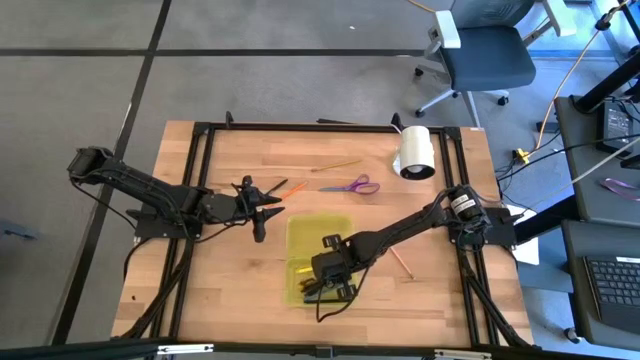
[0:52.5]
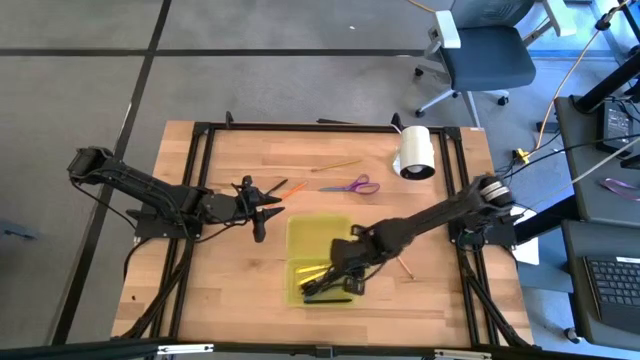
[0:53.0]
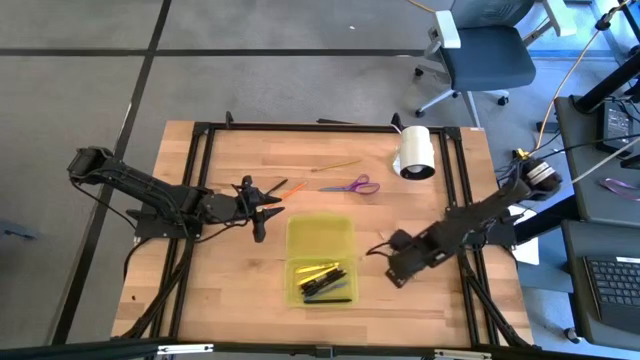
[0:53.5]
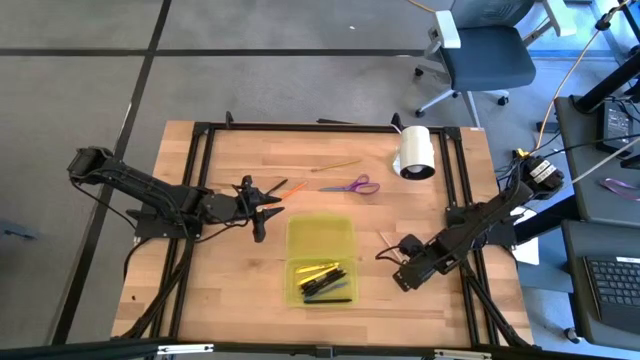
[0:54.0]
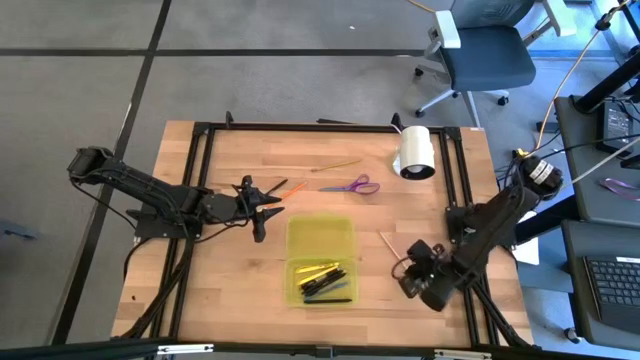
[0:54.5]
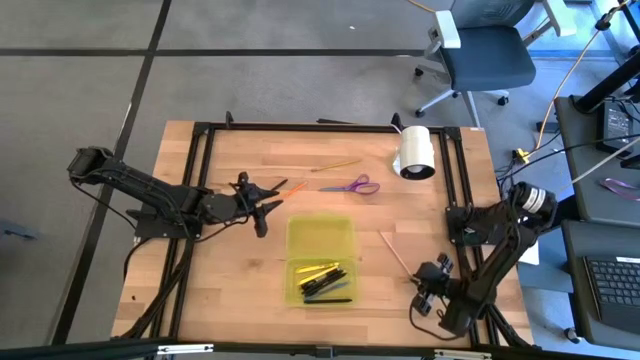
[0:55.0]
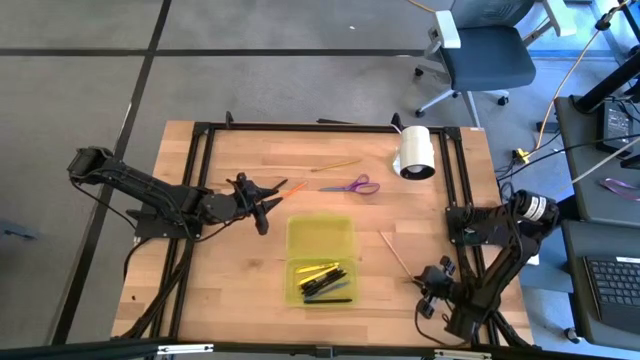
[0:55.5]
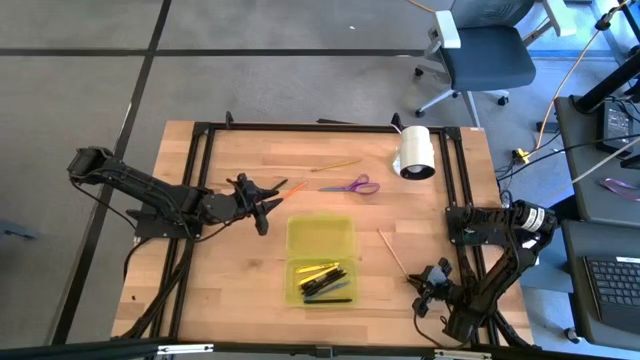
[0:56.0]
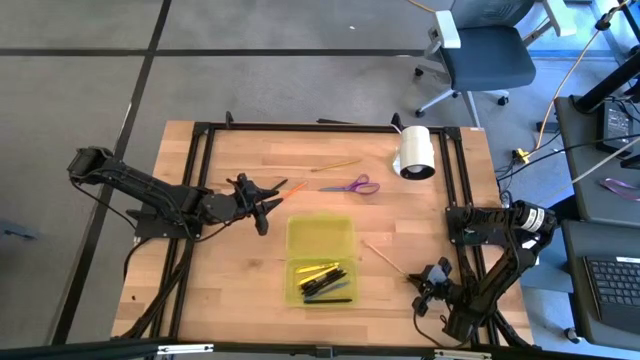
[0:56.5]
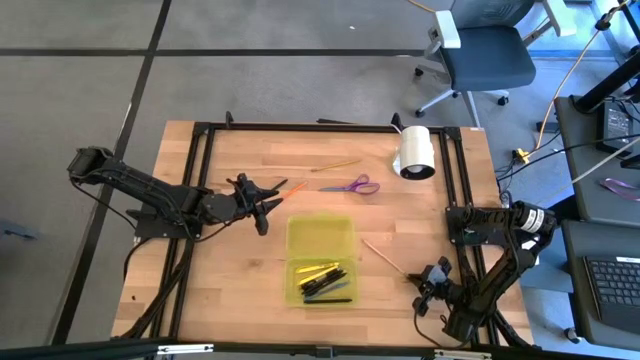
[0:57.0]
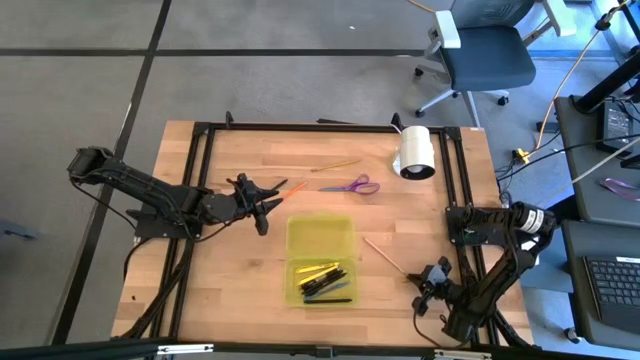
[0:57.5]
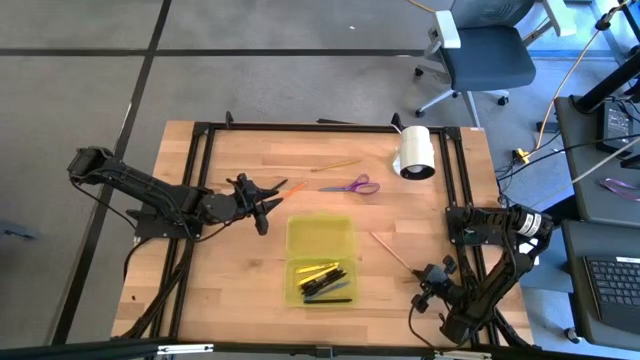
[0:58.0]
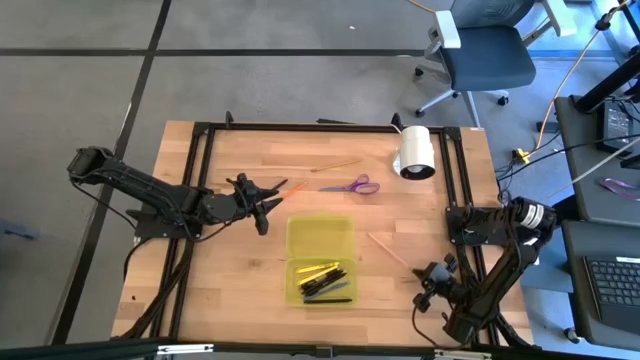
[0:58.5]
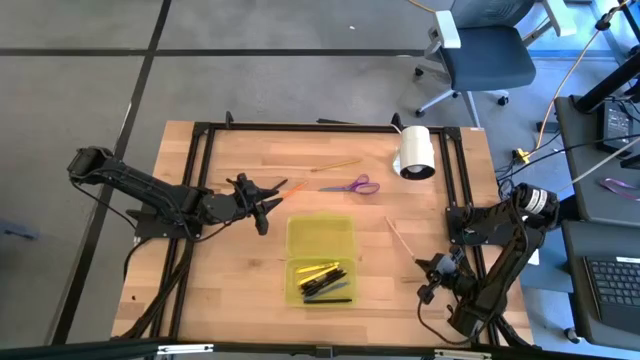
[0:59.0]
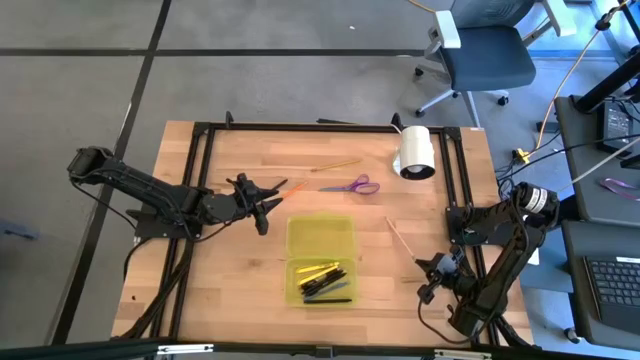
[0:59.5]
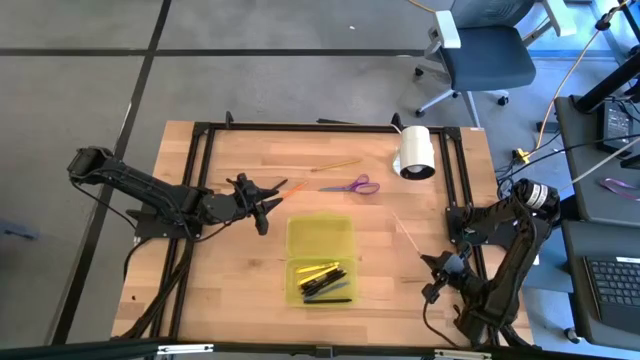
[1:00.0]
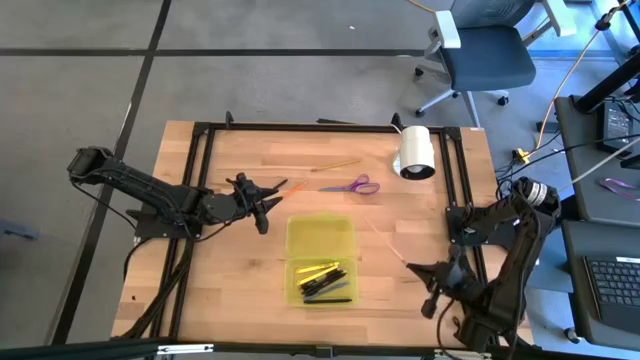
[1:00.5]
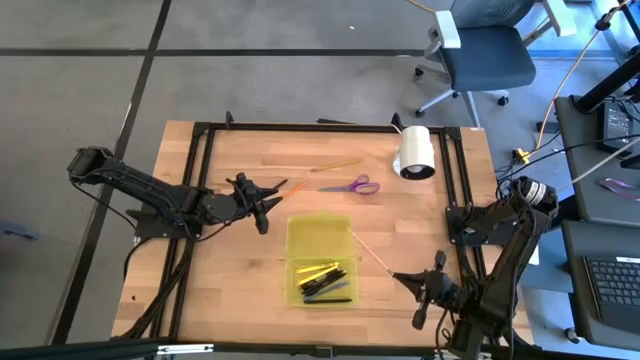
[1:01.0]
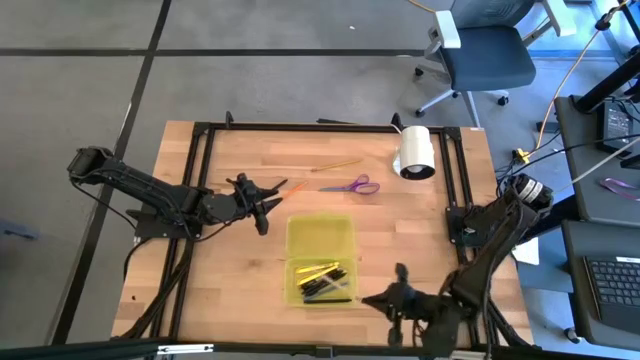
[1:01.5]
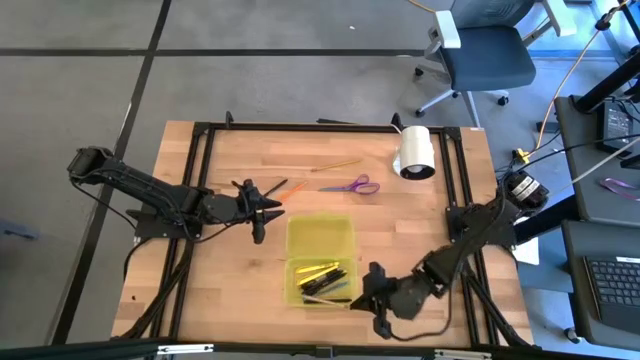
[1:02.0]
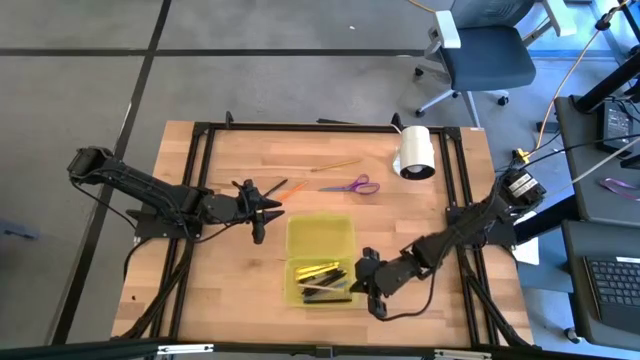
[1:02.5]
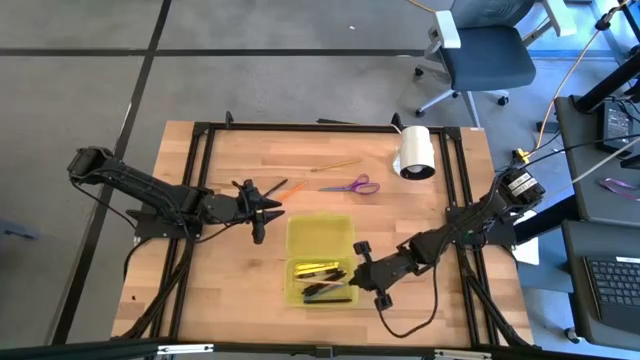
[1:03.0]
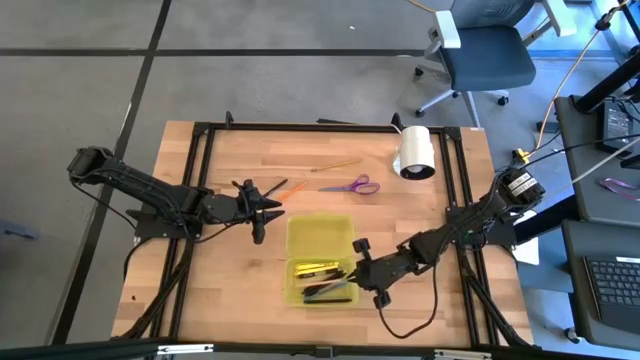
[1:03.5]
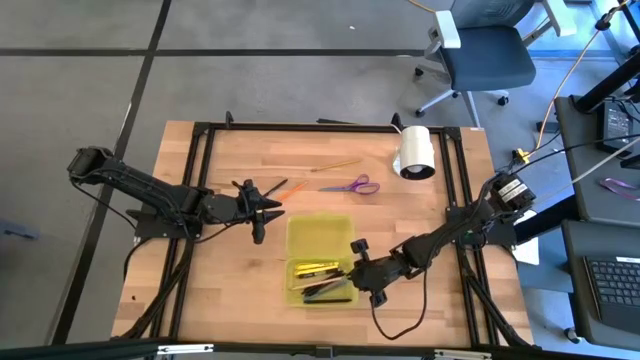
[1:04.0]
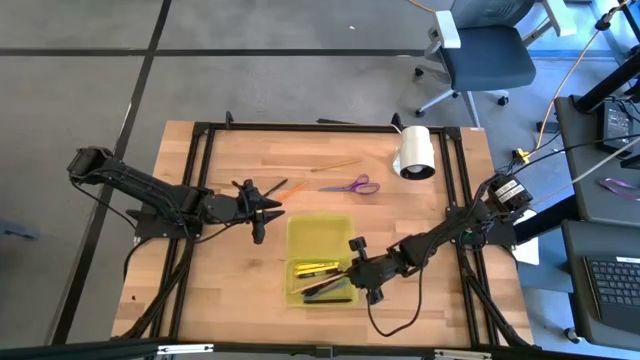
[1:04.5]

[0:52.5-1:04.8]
Task: Pick & place school supplies into a supply box
Put the pink pencil into the yellow supply box

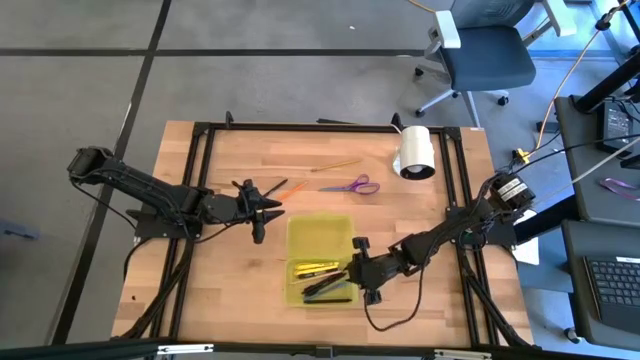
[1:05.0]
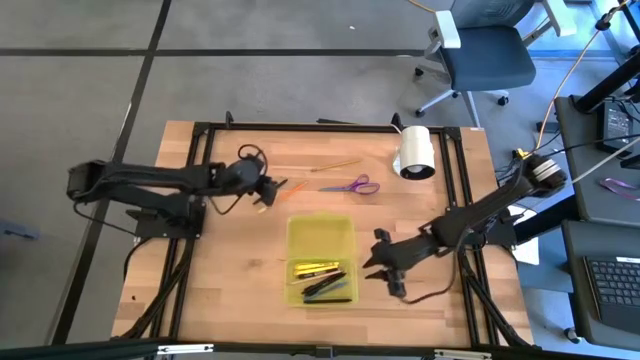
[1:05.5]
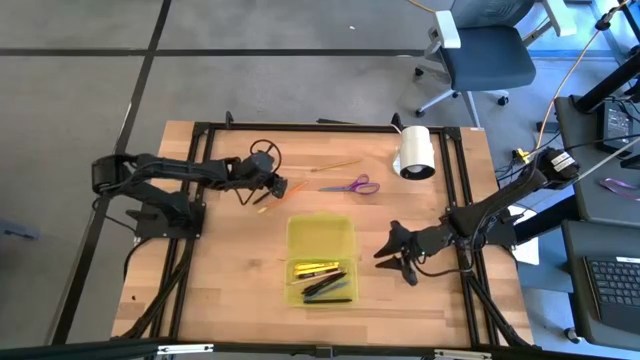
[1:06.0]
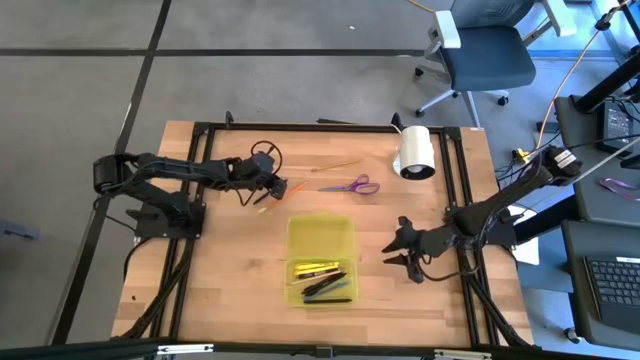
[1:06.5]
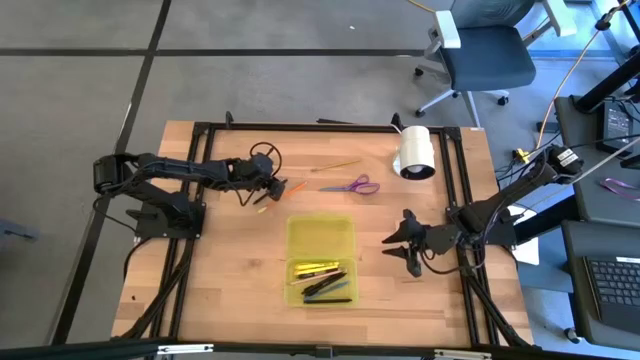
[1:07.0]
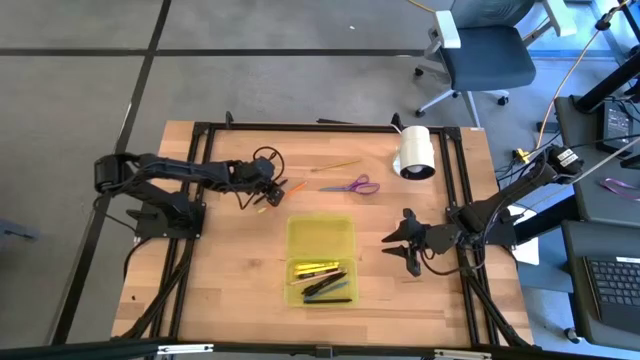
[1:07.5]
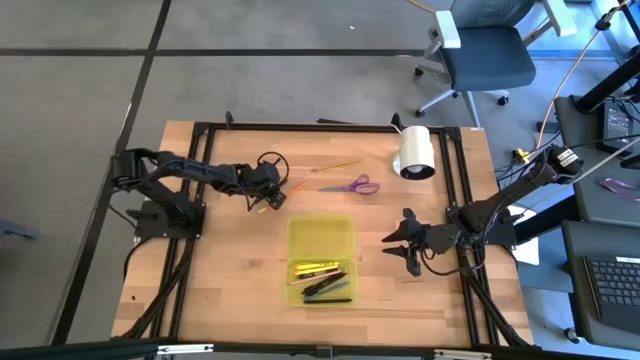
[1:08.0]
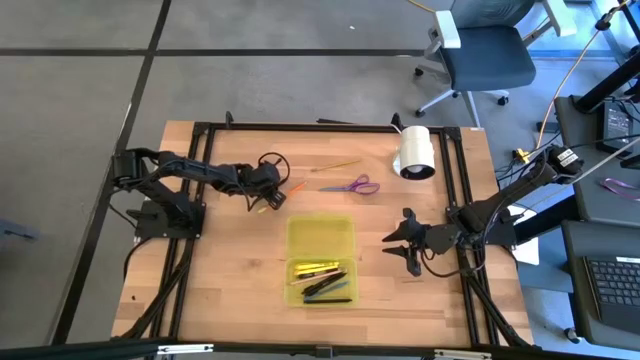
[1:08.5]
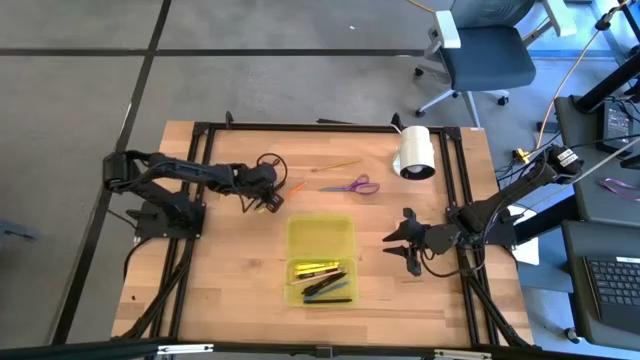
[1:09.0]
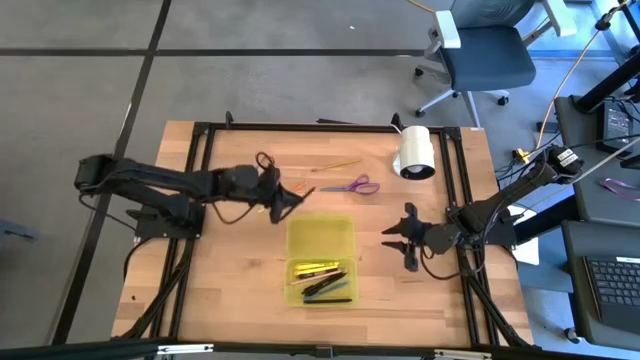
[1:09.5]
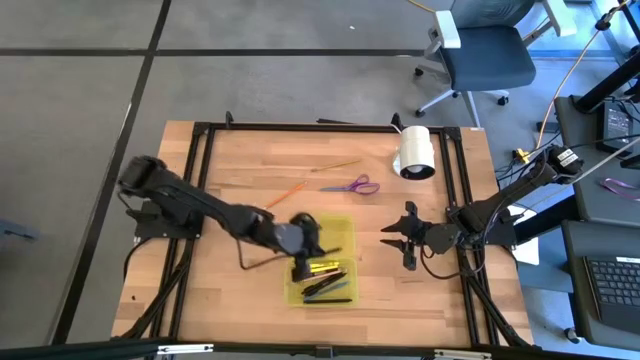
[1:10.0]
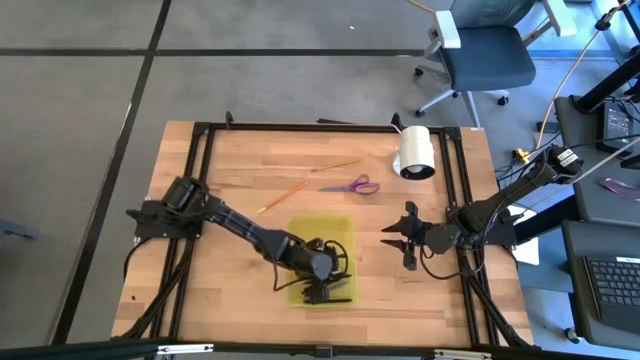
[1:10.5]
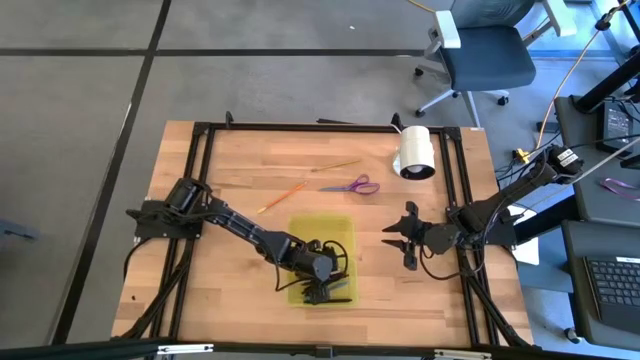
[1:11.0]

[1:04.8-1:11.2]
Put the black pen into the yellow supply box

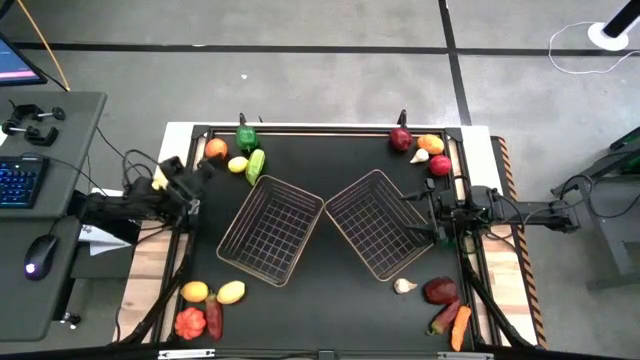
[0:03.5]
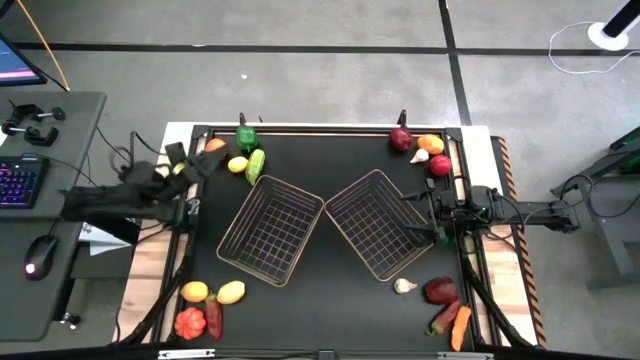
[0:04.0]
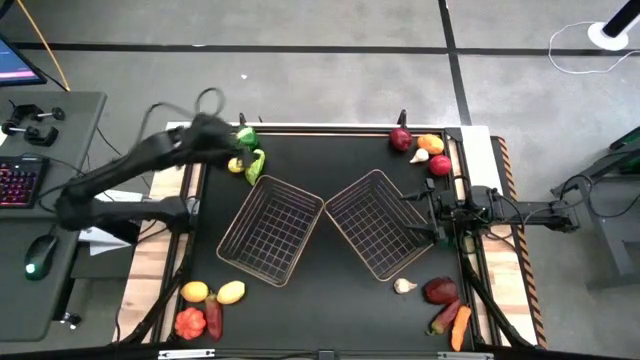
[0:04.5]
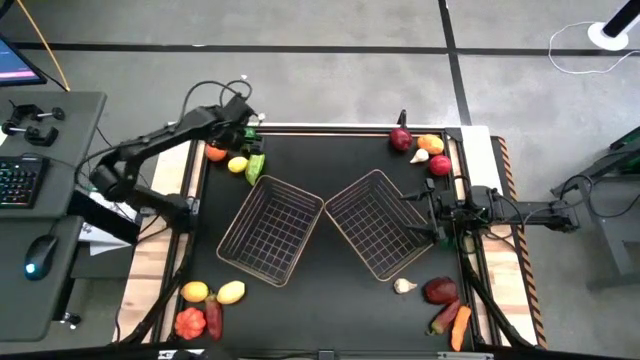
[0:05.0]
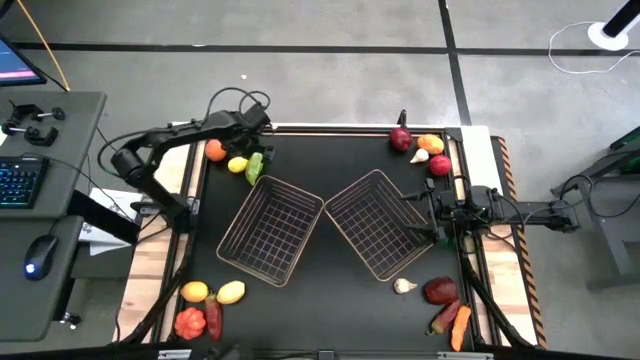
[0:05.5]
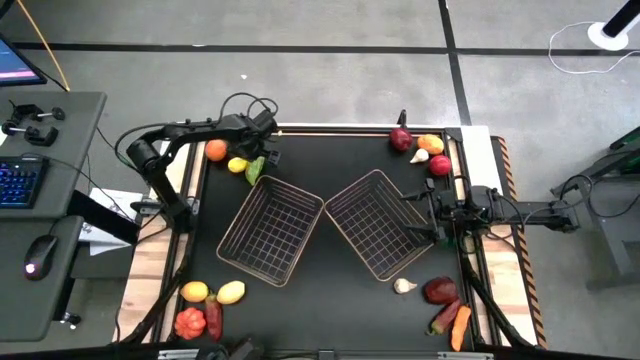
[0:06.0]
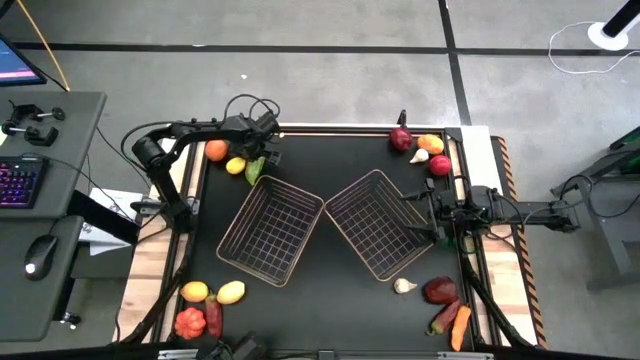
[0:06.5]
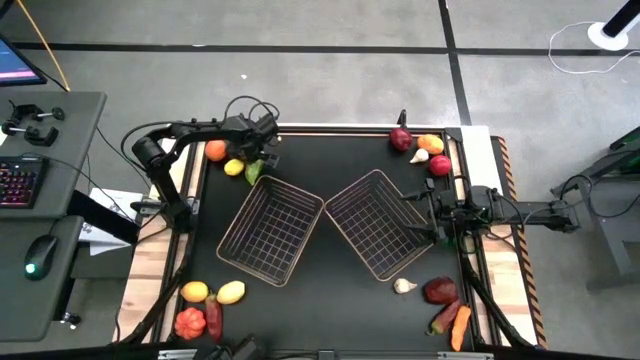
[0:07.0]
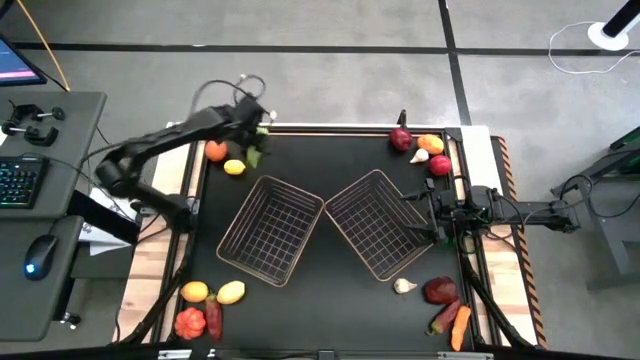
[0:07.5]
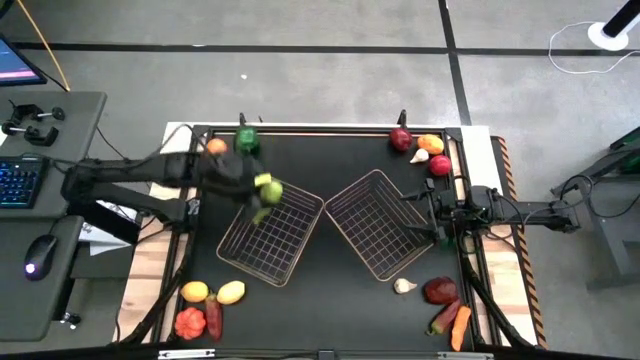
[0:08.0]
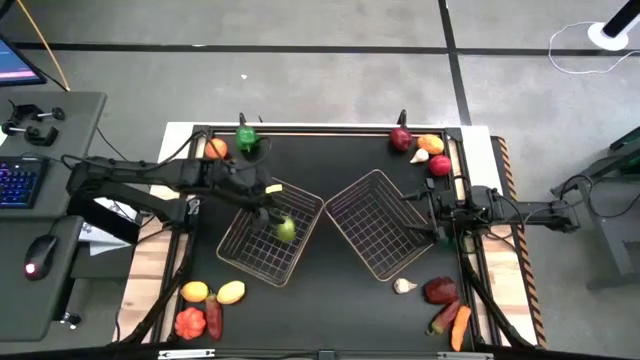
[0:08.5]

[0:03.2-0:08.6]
Task: Sort produce into baskets
Put the chayote into the left basket
